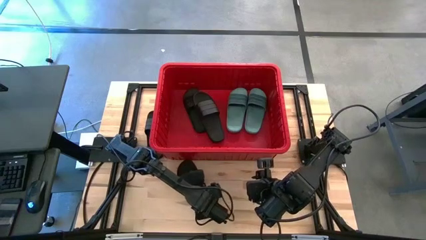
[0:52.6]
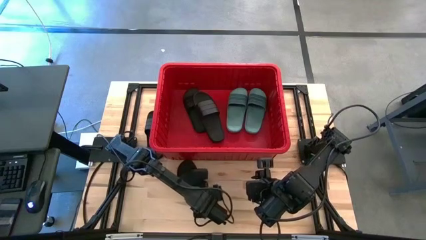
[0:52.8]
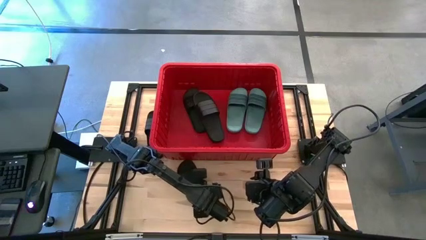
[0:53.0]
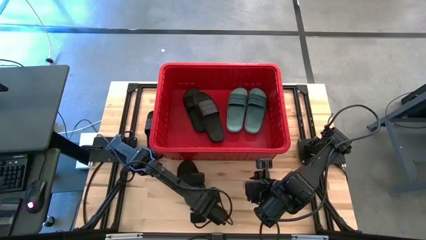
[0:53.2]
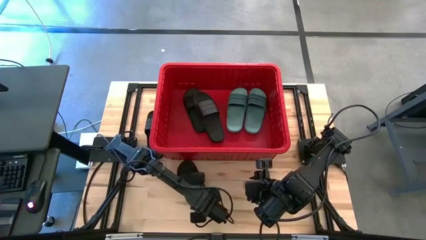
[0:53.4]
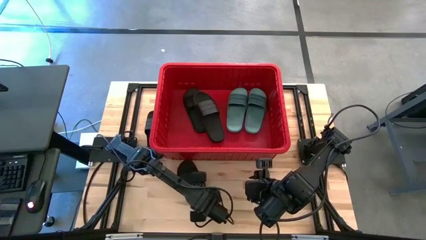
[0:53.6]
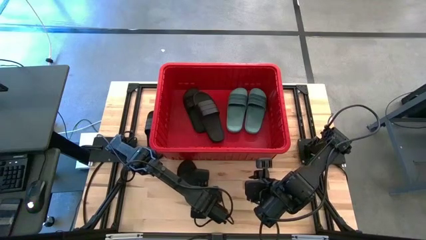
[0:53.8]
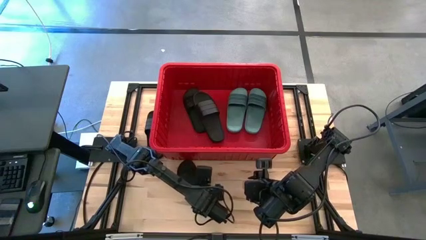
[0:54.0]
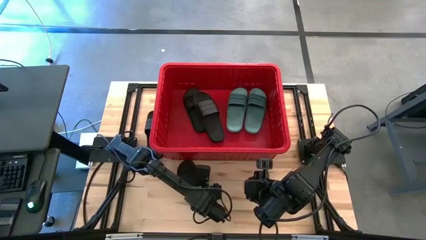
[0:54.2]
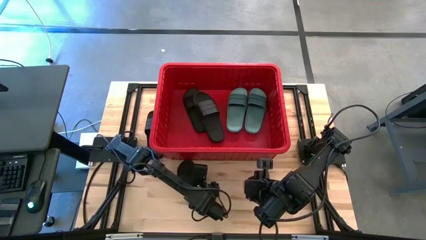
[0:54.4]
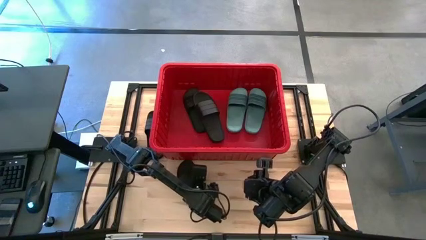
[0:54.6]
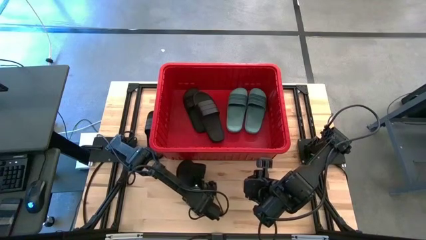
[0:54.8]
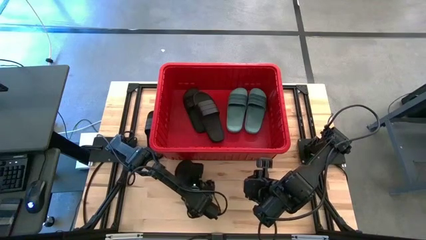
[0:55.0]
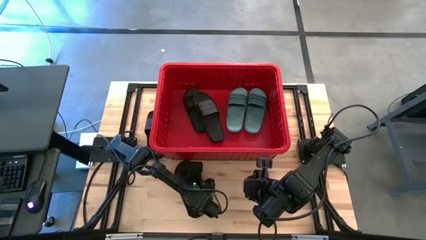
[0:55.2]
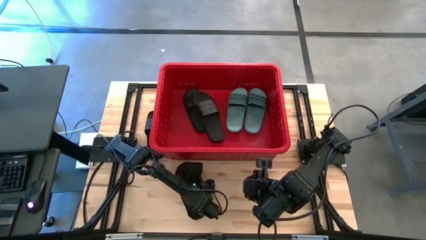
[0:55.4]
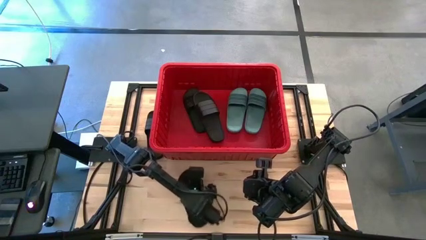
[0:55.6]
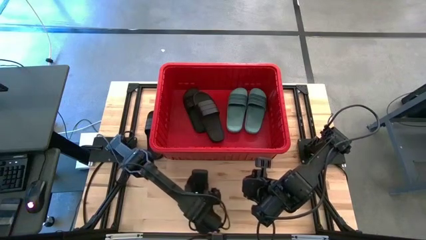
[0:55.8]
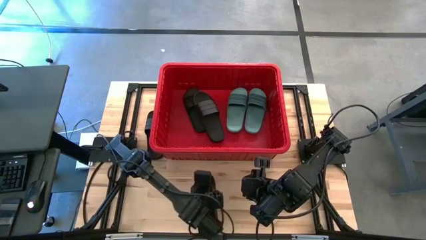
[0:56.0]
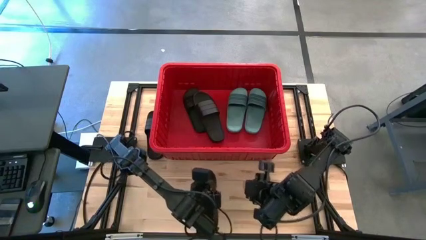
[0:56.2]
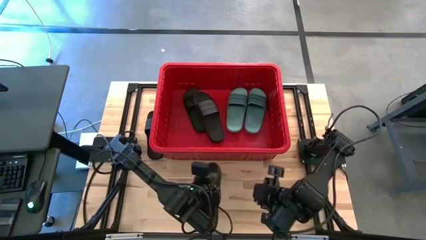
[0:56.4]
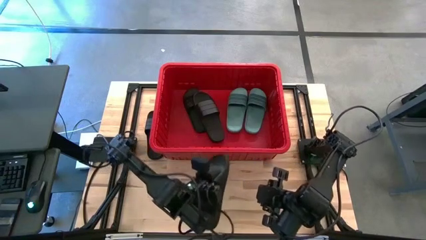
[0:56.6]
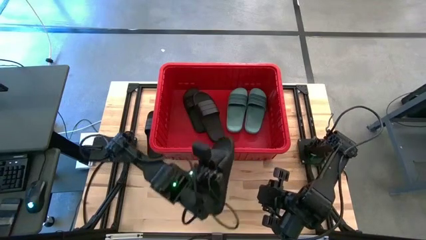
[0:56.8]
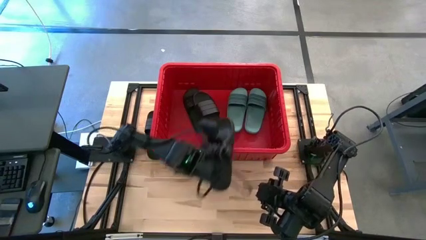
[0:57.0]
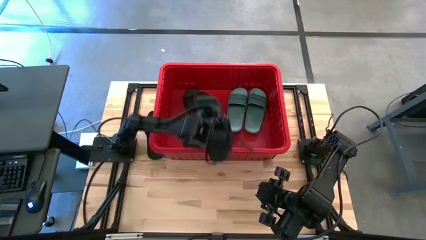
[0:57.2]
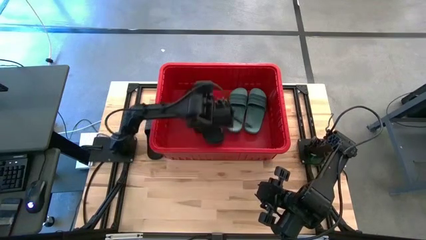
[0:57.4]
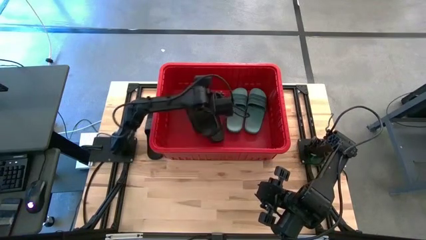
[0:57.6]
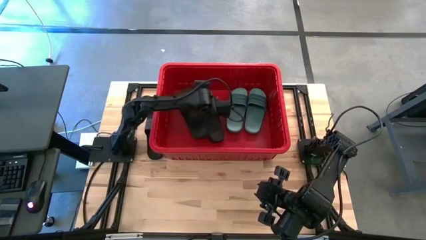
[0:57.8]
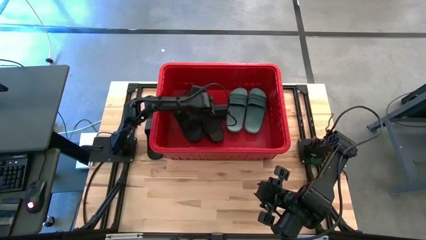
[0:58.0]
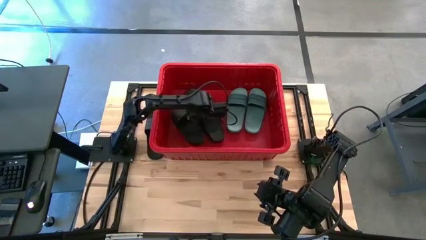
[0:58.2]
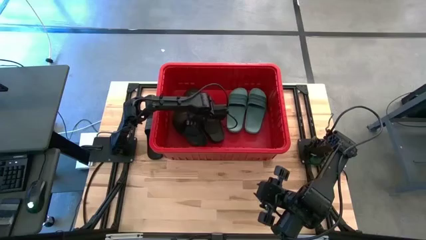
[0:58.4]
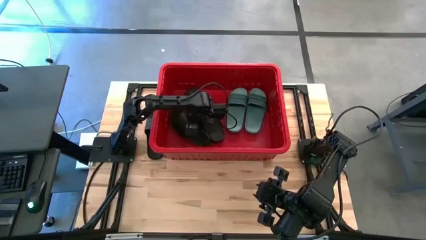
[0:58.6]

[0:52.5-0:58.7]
Task: Pick and place slides into bin
Put the bottom black slipper into the red bin

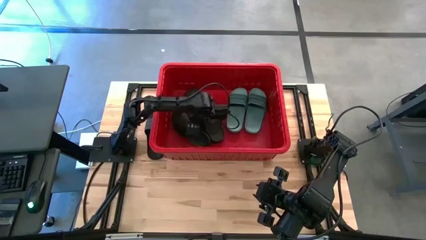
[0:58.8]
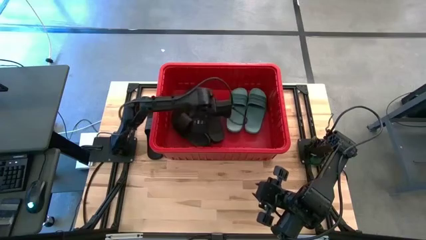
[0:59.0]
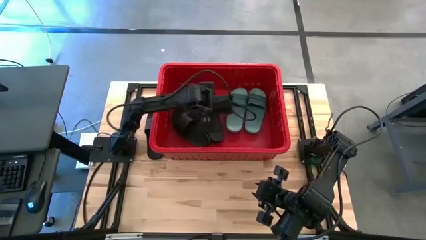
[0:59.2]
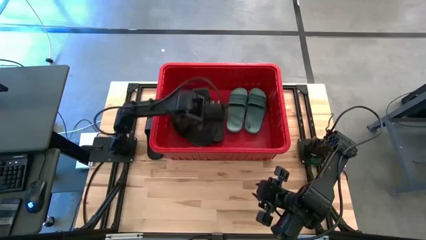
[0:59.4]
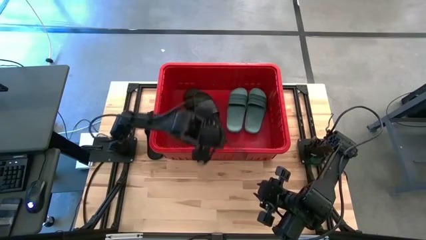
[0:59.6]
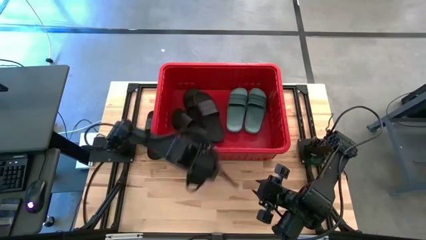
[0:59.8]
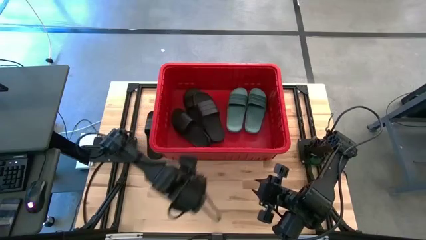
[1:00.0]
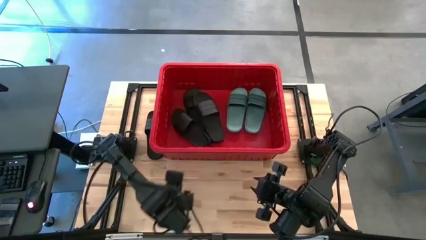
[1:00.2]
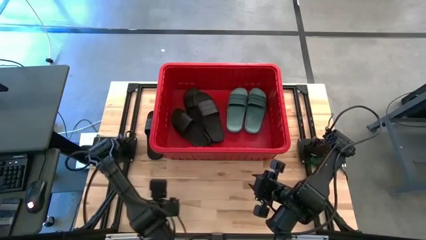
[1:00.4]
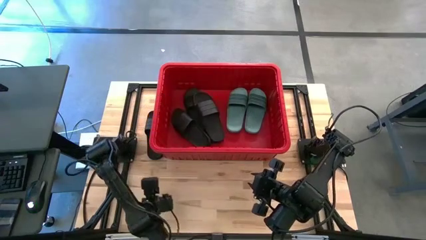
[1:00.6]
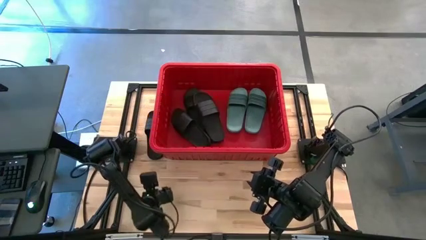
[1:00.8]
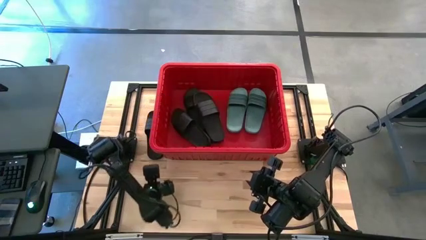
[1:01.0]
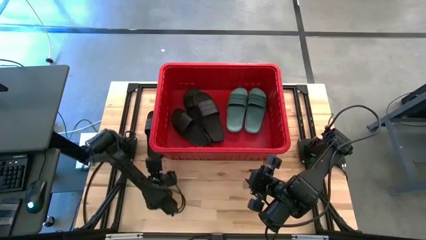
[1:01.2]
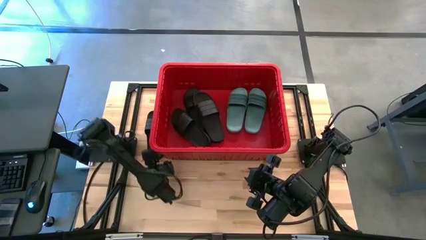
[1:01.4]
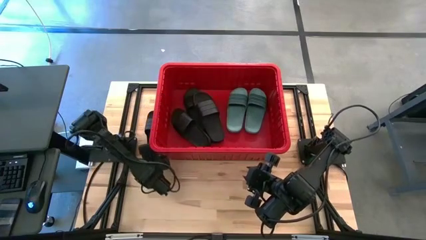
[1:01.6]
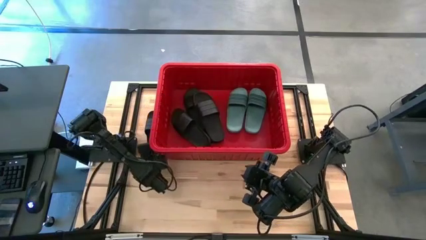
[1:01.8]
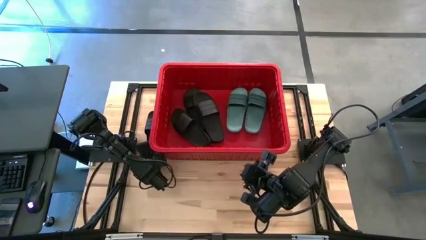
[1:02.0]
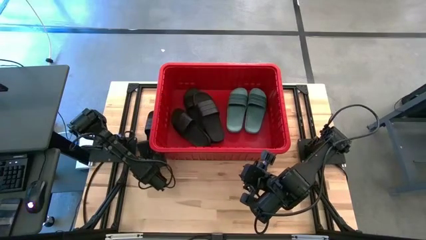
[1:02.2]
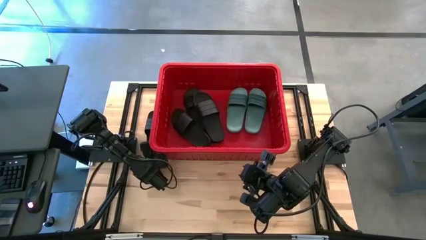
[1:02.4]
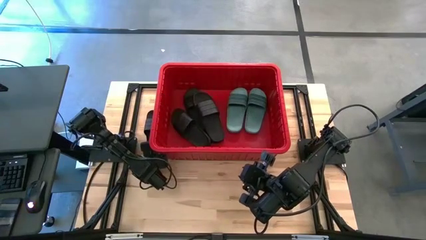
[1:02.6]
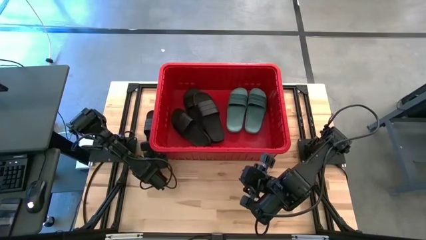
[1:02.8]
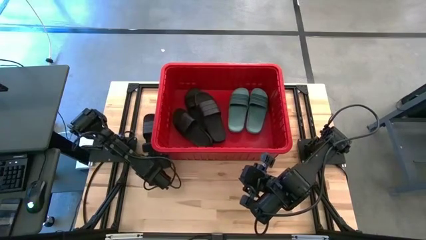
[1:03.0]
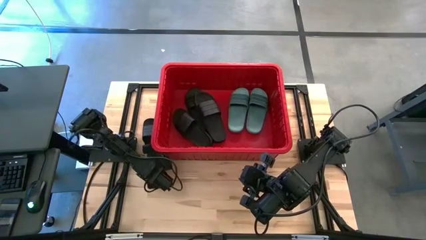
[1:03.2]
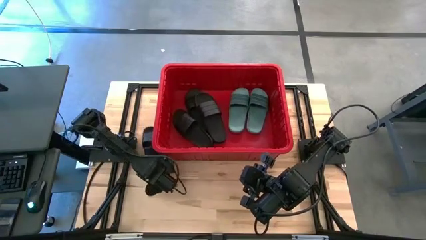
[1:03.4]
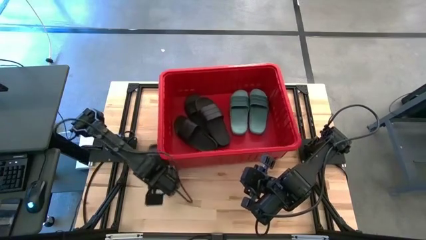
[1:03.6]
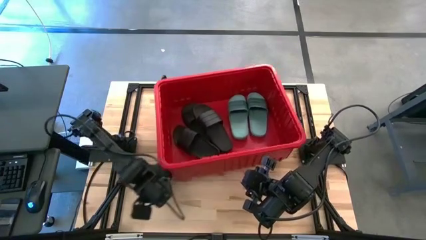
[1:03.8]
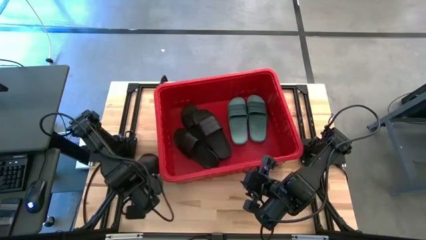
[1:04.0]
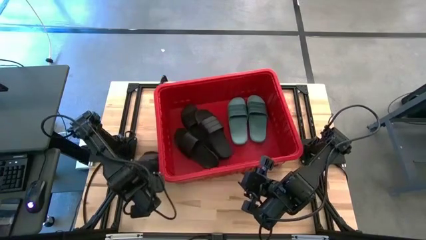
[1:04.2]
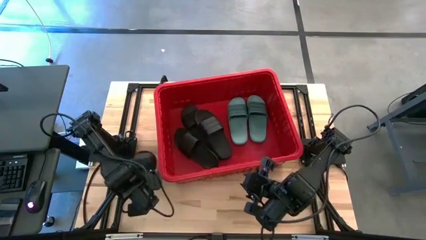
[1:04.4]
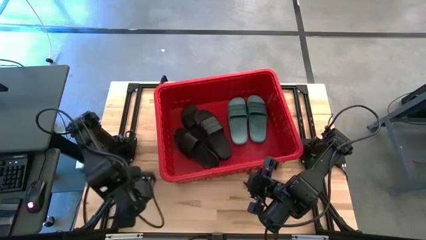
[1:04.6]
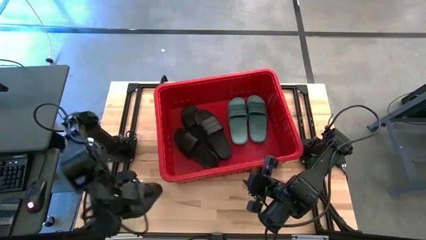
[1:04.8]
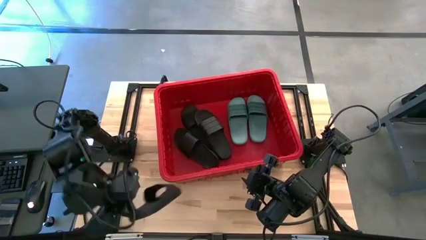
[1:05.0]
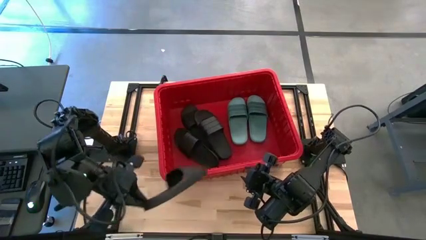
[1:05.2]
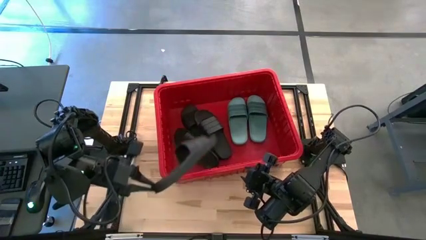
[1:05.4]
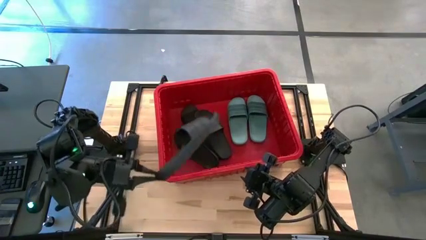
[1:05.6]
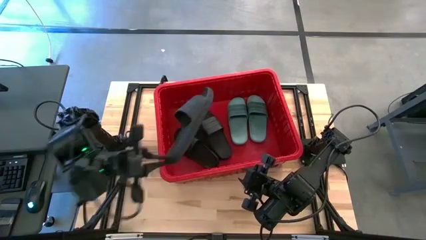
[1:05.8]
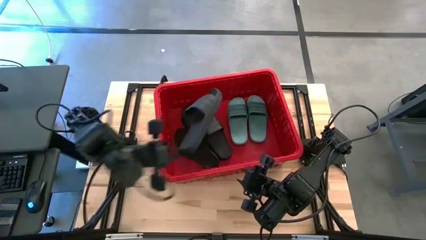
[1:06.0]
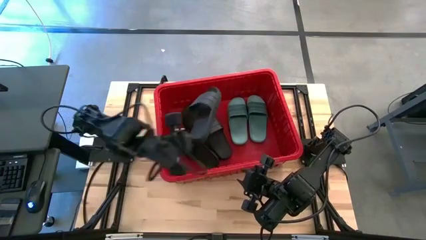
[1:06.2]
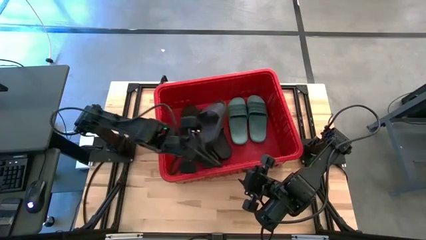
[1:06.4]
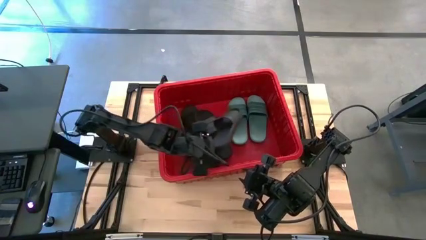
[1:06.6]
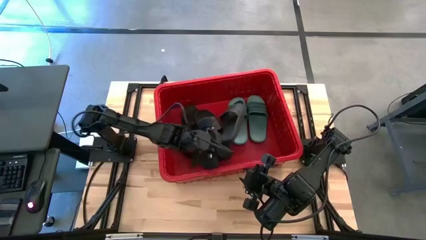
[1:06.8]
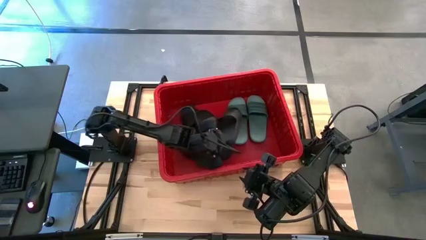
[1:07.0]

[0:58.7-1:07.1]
Put the black slipper into the red bin

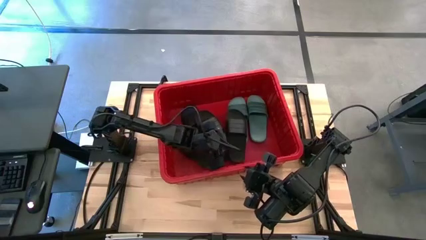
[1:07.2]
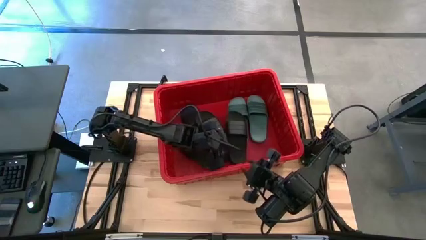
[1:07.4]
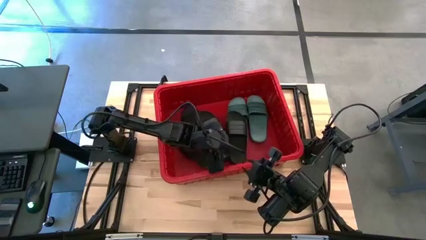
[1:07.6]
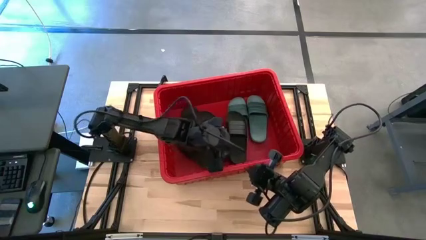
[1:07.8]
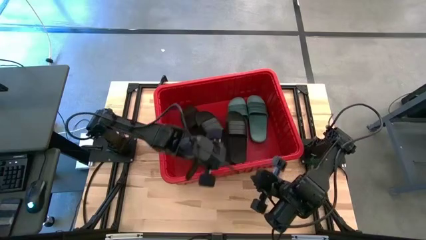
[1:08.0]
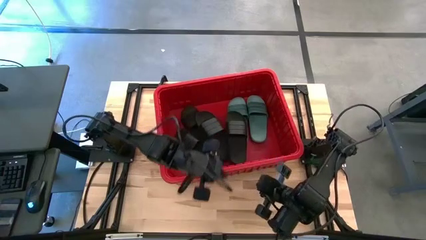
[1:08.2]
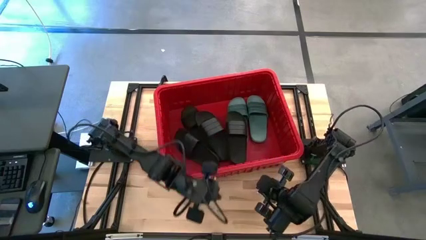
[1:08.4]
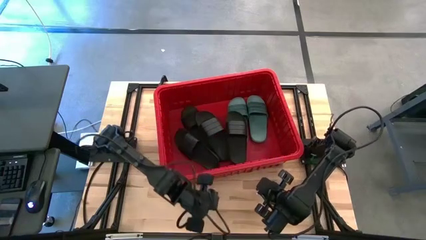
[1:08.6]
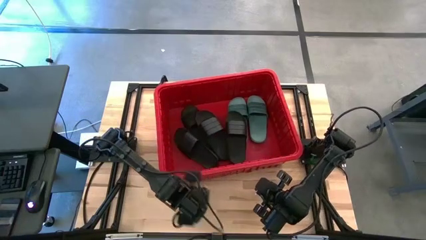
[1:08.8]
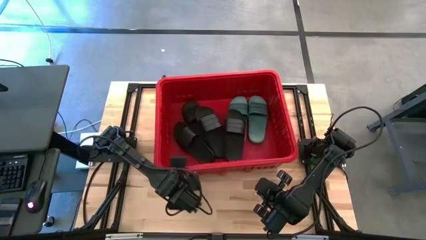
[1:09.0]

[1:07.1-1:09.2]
Adjust the red bin
